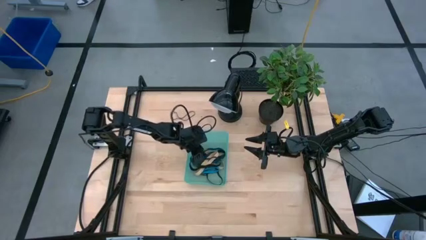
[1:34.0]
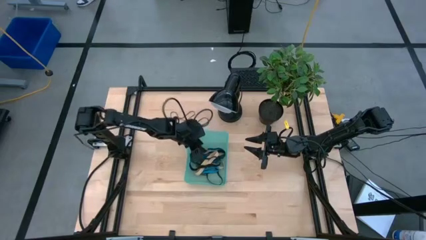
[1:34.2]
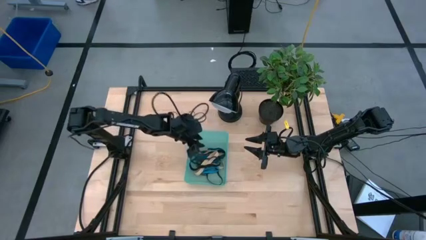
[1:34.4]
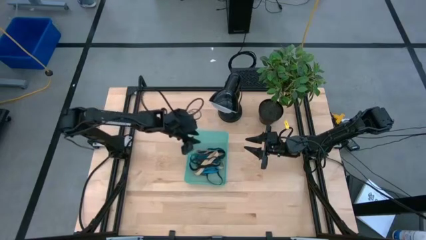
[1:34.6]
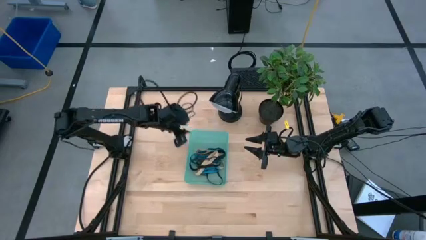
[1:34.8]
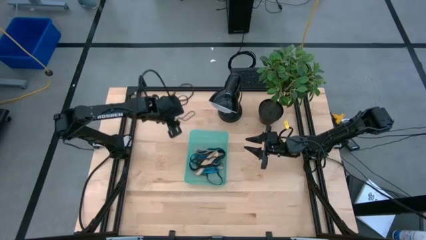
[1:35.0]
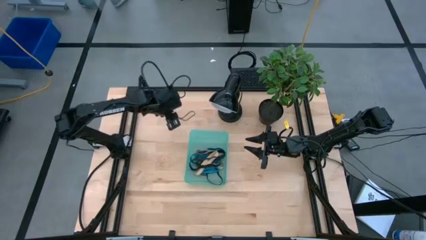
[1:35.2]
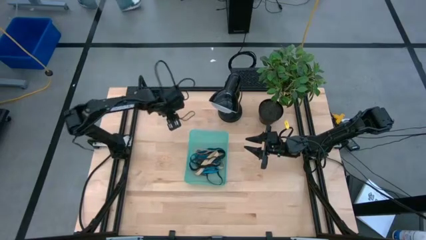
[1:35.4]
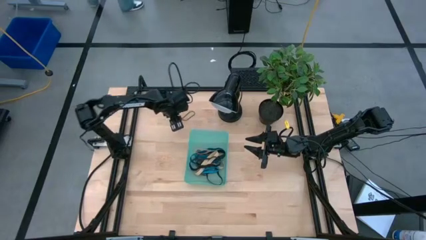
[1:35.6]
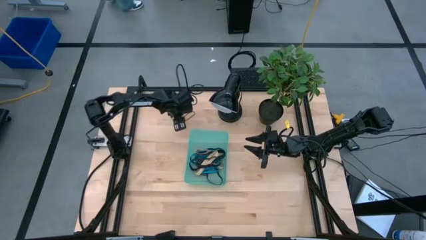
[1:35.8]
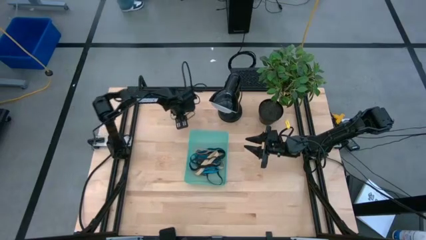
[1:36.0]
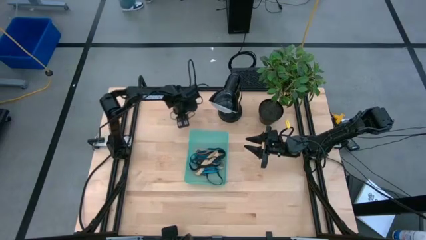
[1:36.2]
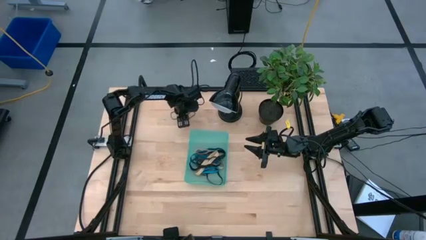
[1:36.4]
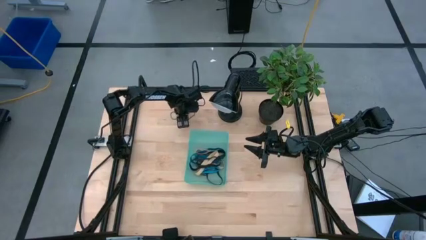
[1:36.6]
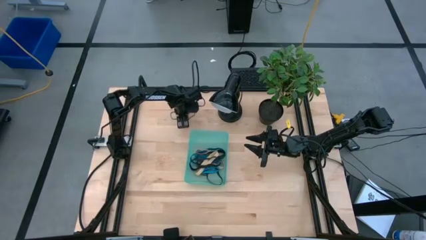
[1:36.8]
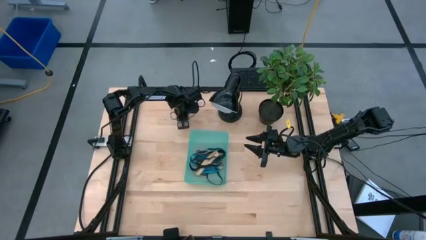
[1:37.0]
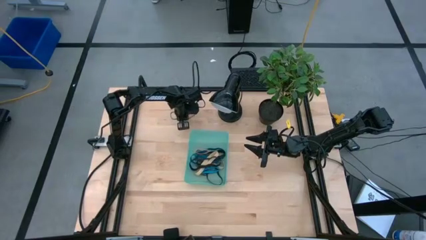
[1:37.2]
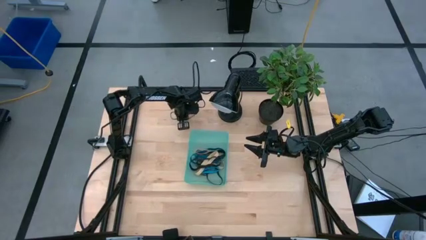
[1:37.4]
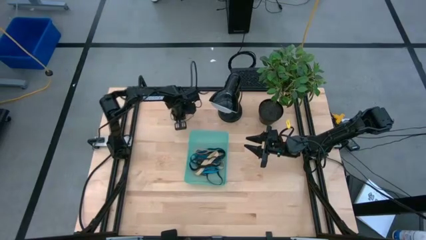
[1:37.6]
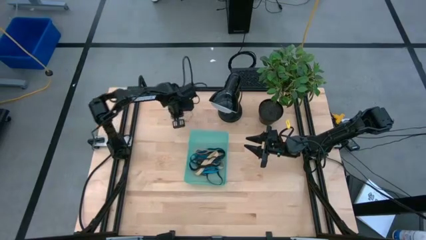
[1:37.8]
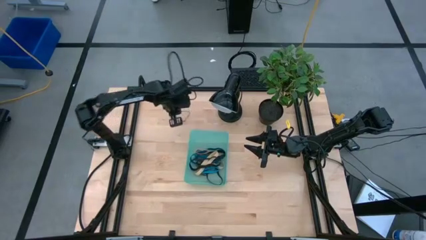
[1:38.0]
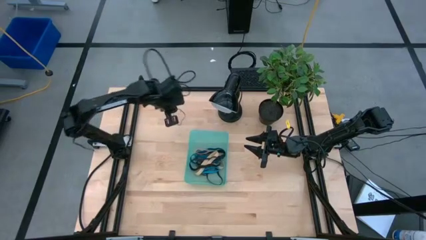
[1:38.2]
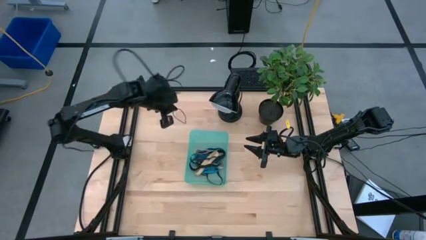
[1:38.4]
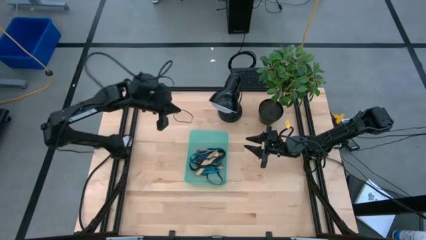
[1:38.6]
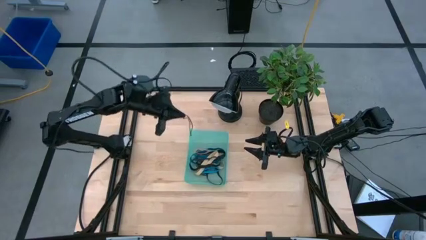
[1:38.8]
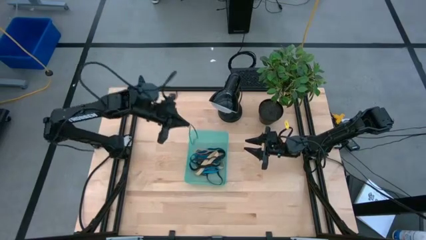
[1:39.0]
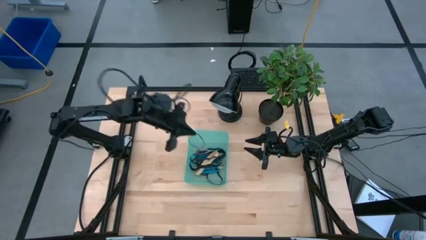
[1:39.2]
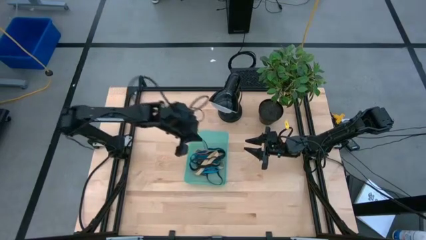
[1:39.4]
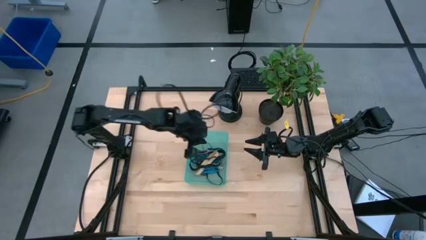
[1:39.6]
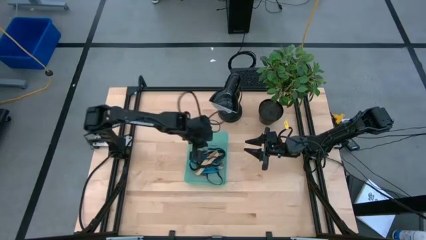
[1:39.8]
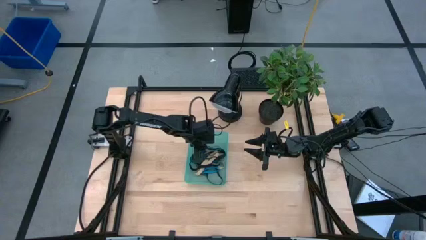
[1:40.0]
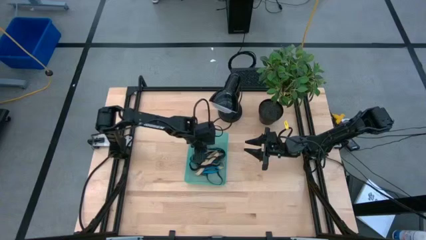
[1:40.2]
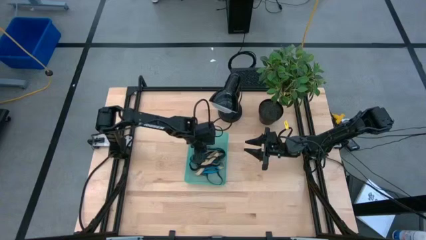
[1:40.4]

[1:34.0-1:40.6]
Task: Pick and place rubber bands into bin
Put the purple rubber band into the basket

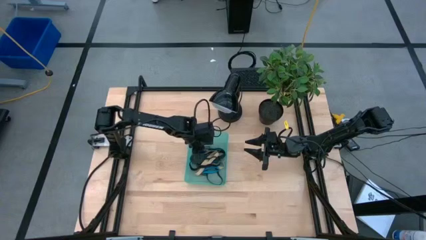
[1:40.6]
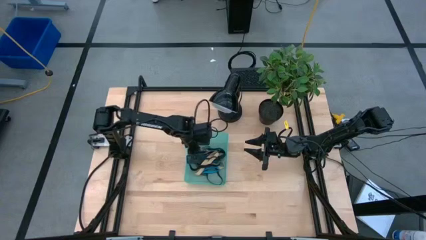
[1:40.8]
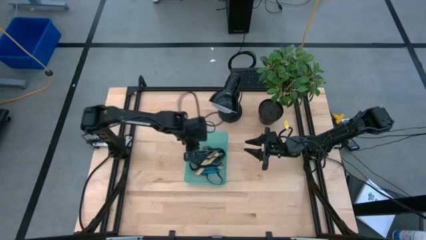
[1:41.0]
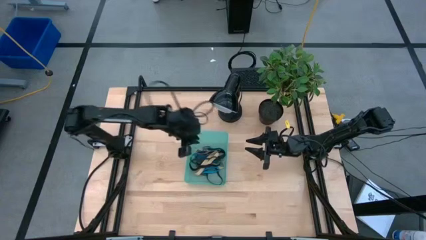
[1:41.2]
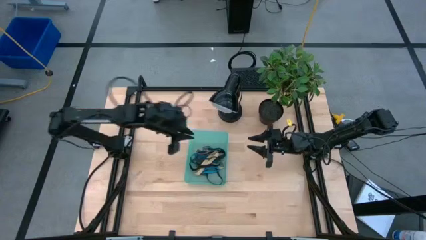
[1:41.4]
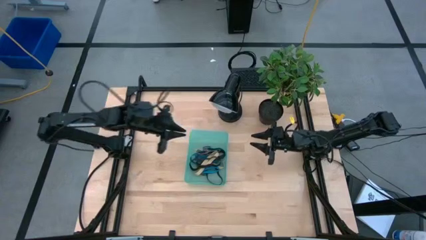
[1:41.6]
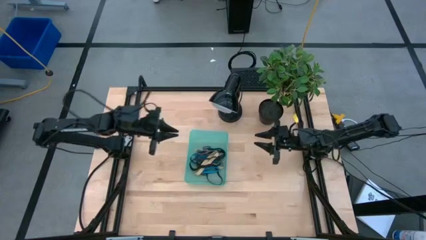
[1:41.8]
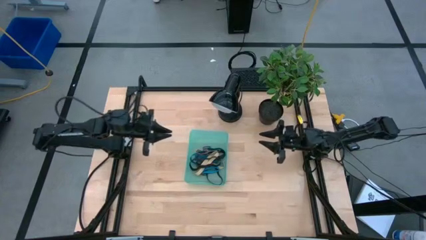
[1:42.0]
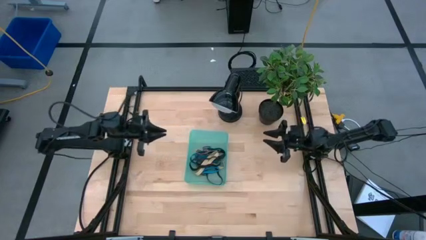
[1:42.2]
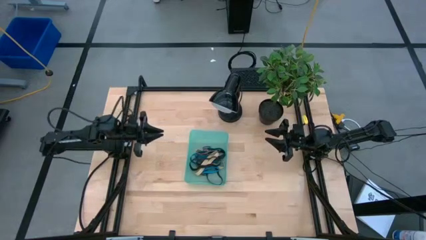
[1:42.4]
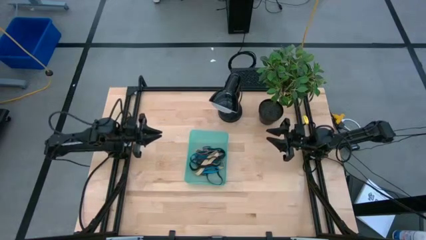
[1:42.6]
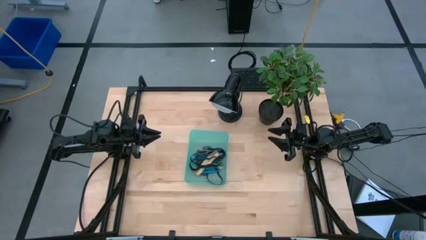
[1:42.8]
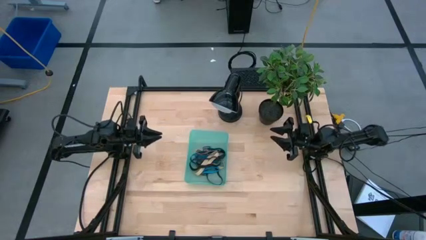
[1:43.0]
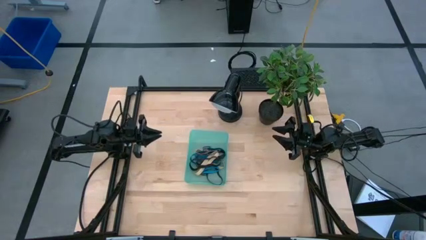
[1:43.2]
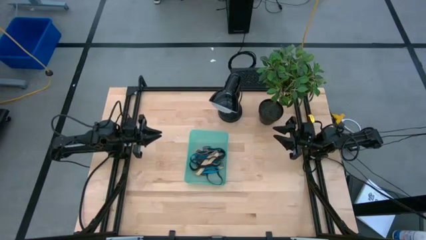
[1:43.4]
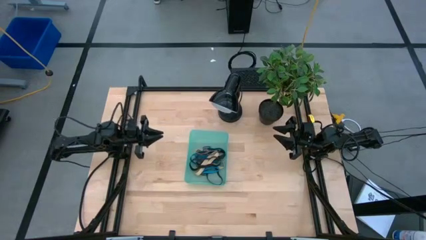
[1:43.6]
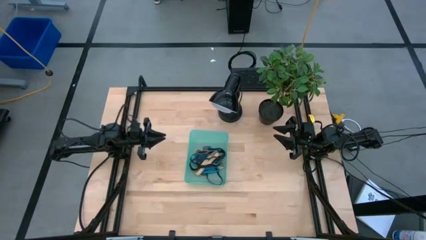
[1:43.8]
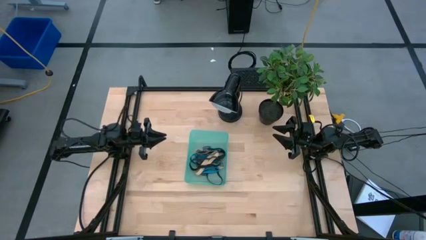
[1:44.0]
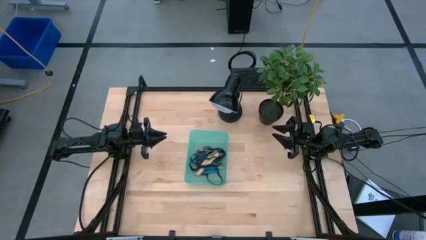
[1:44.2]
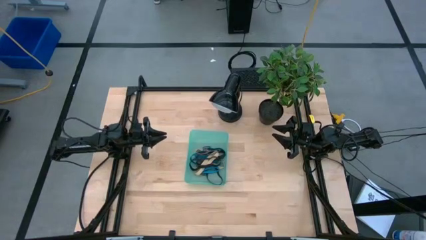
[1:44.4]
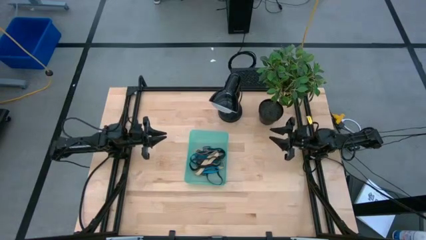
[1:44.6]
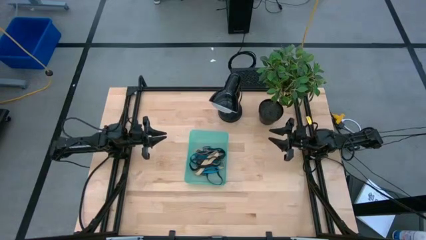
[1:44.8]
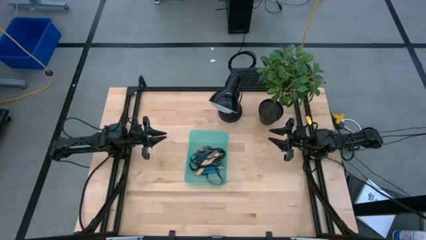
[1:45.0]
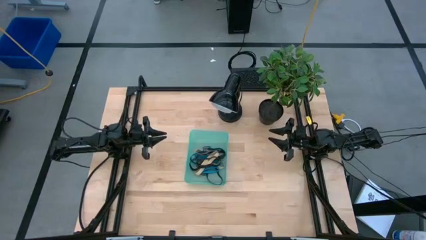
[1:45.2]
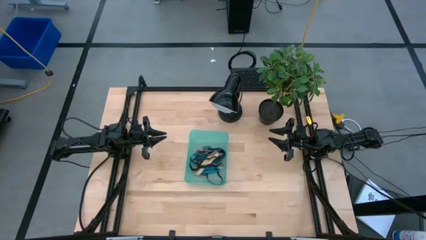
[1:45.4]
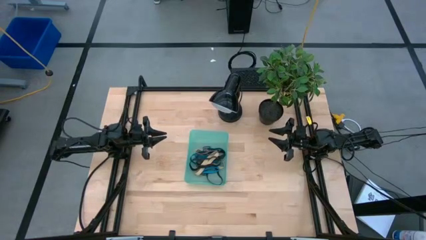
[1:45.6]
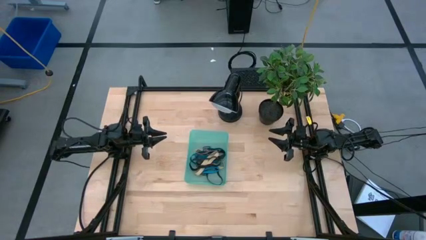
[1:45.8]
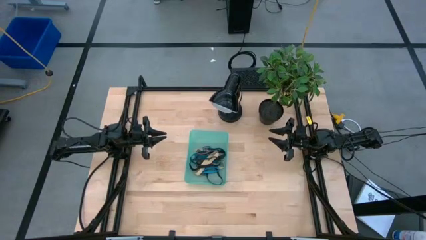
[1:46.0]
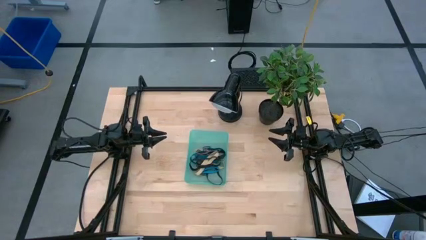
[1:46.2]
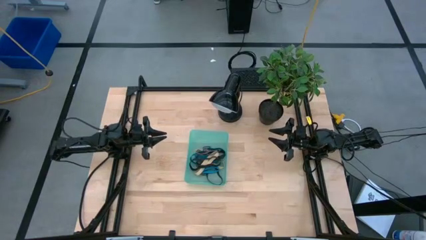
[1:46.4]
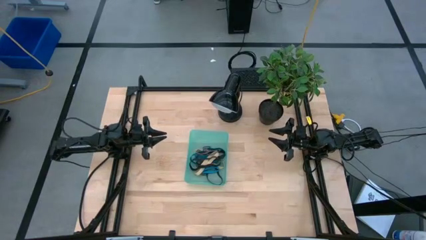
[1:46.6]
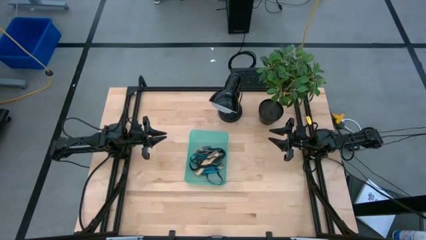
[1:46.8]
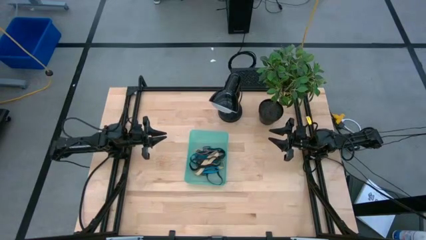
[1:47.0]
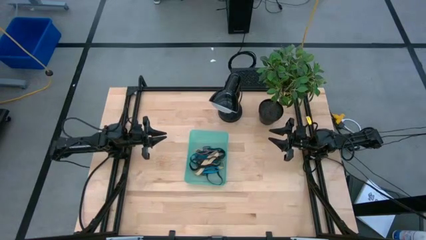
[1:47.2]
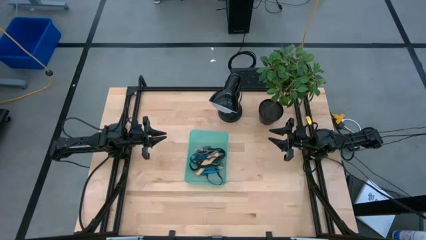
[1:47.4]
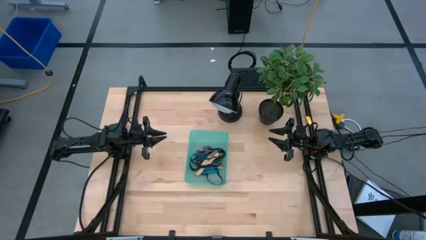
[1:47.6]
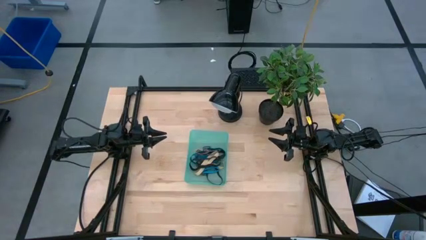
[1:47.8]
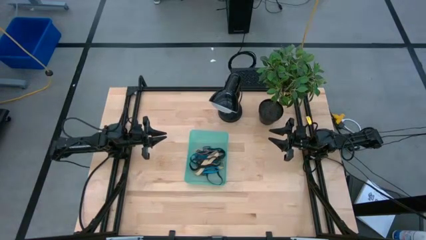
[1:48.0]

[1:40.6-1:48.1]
Return to Home Position

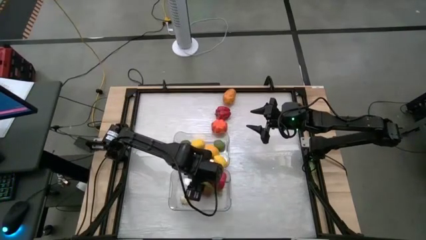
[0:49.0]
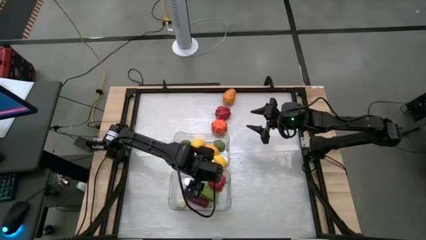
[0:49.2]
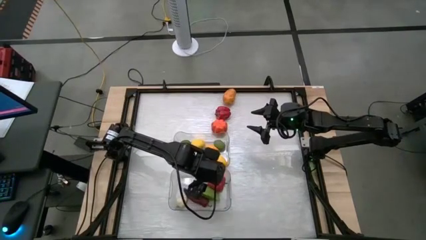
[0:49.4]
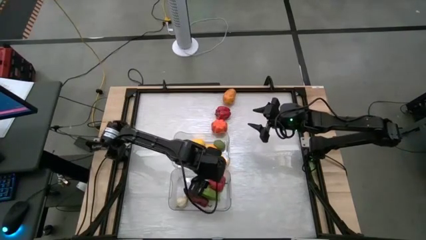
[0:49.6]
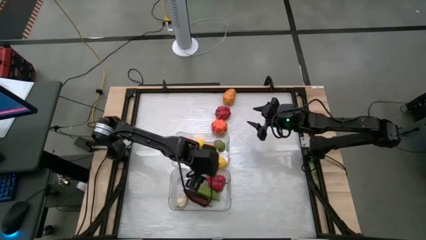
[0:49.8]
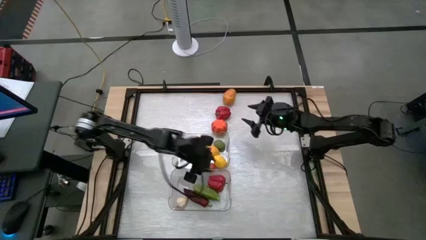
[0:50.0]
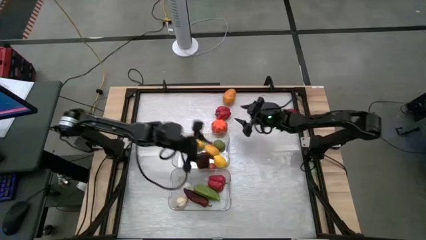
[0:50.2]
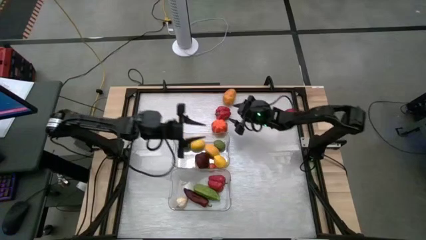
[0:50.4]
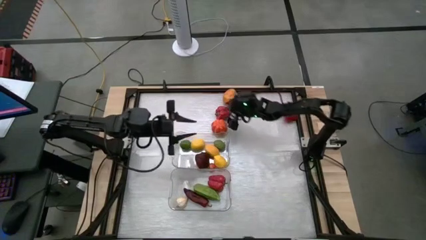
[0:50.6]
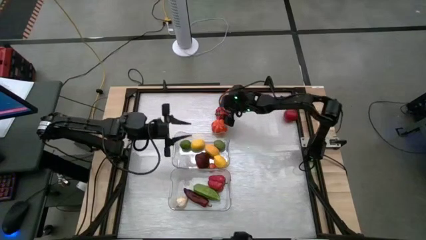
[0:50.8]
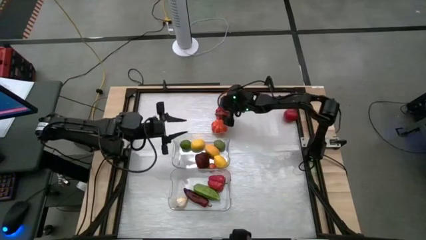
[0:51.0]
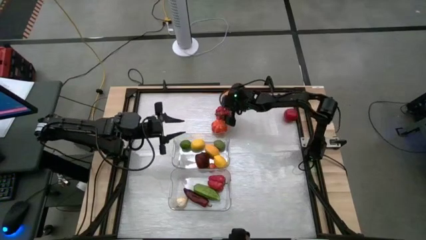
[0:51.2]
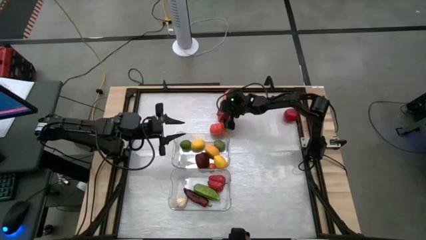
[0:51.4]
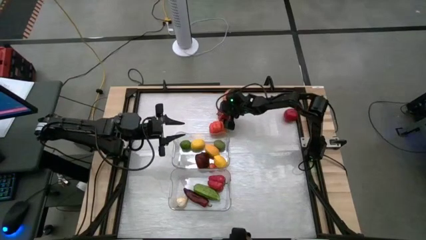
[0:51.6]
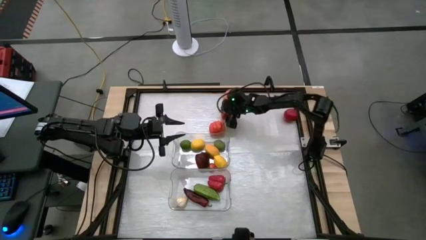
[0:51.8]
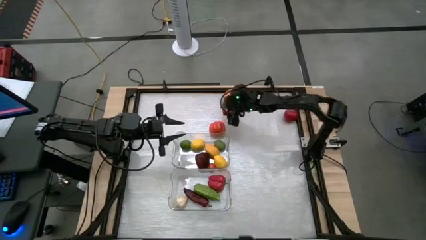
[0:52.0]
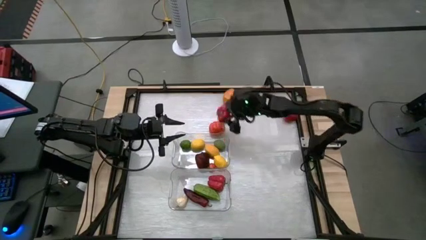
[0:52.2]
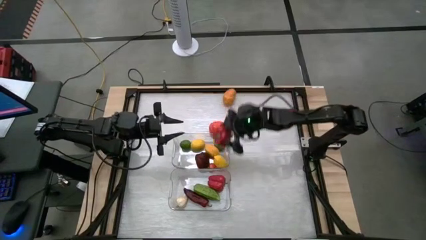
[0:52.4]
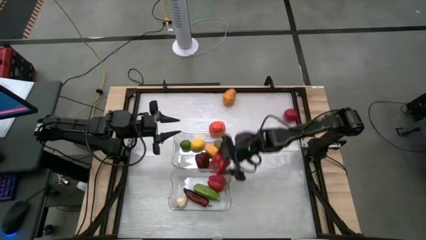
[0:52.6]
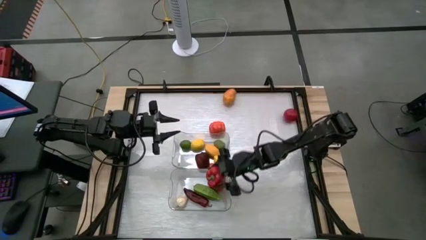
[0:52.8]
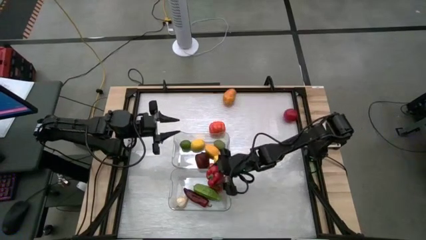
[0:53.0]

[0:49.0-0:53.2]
Task: Sort produce into baskets
Put the red bell pepper into the bottom transparent bin
